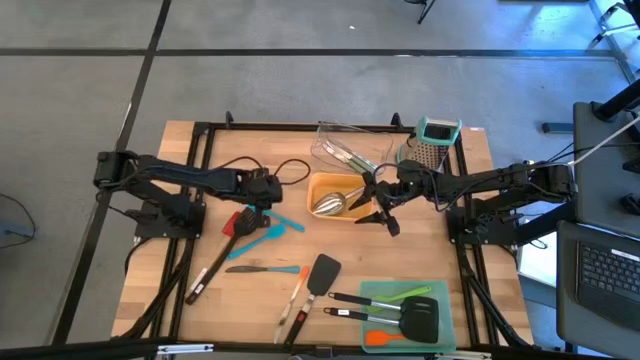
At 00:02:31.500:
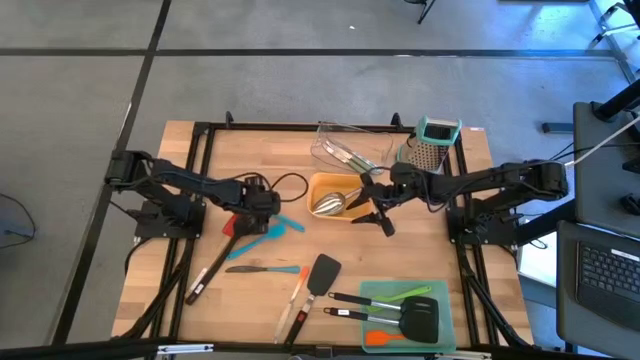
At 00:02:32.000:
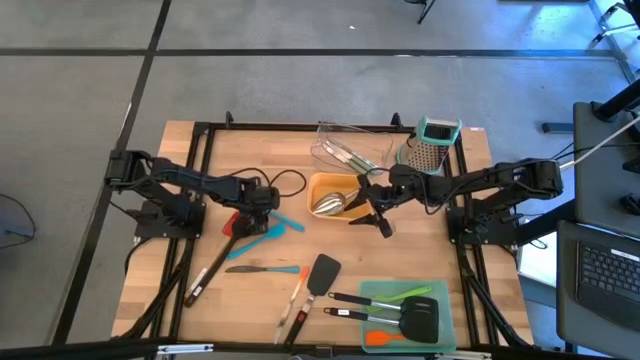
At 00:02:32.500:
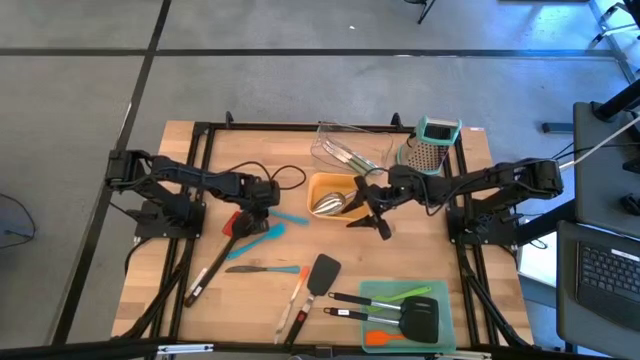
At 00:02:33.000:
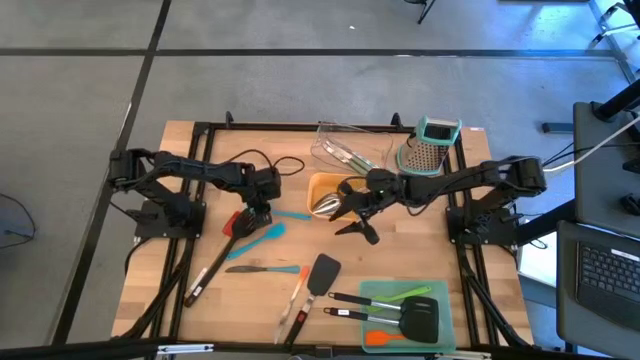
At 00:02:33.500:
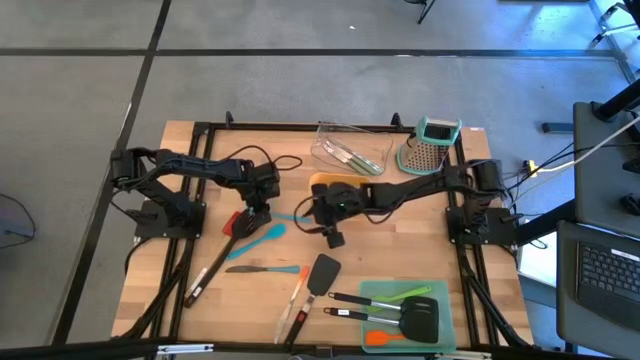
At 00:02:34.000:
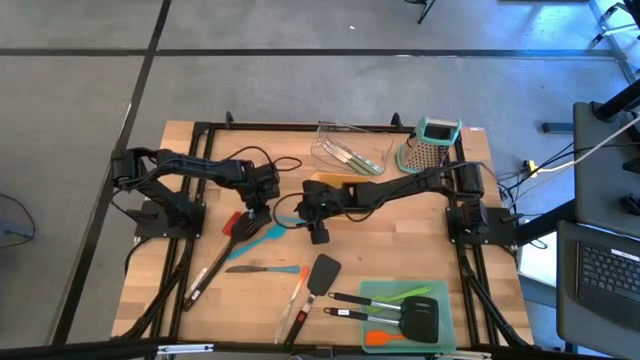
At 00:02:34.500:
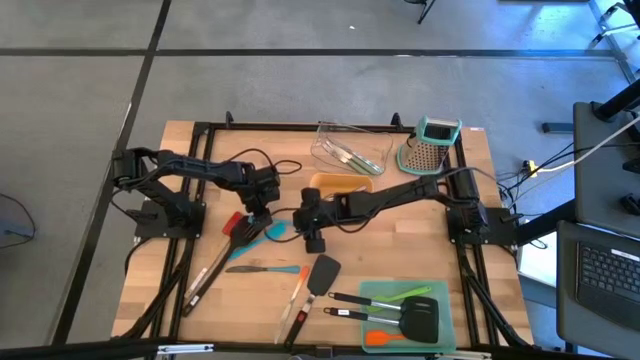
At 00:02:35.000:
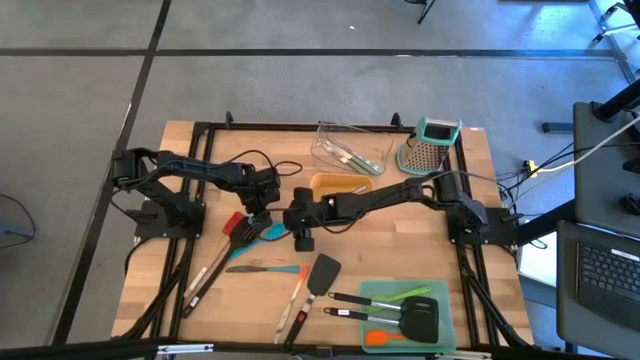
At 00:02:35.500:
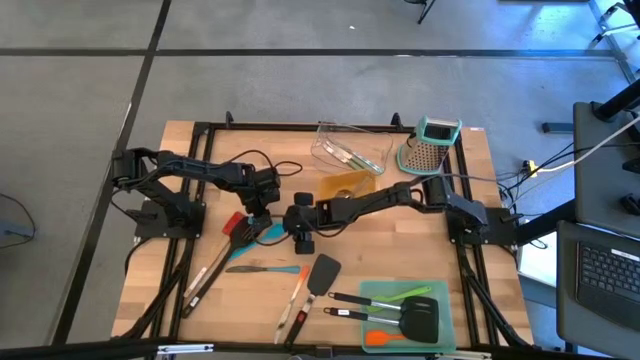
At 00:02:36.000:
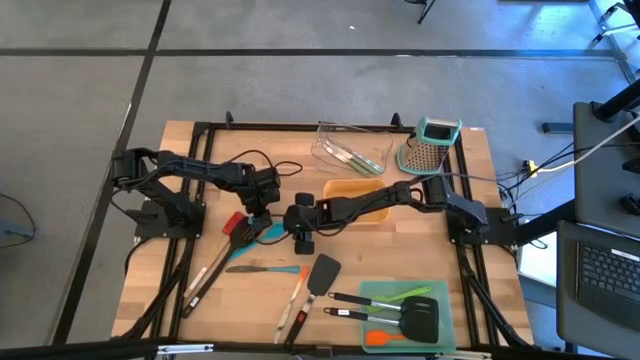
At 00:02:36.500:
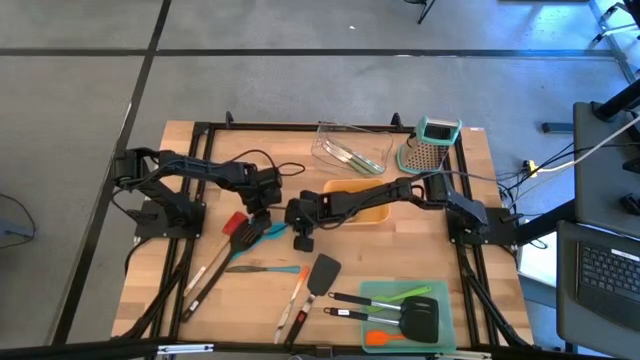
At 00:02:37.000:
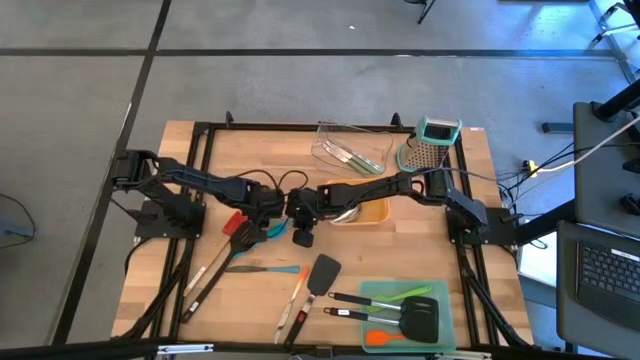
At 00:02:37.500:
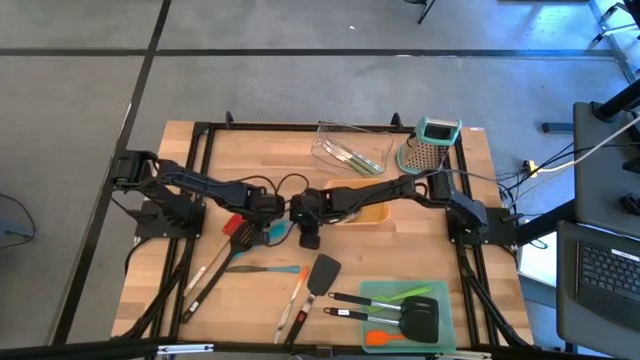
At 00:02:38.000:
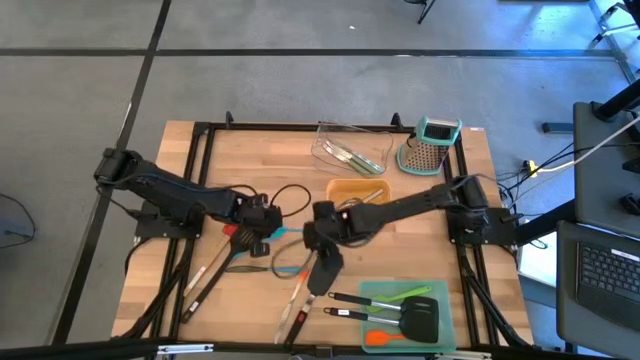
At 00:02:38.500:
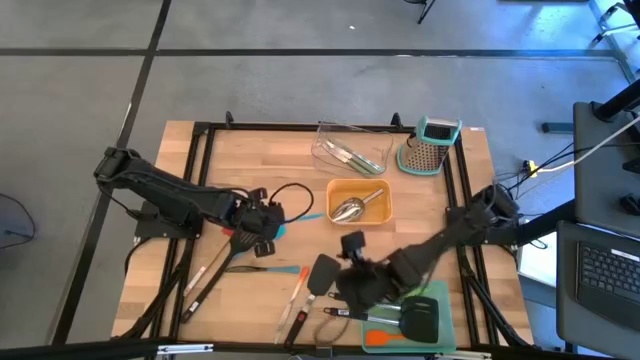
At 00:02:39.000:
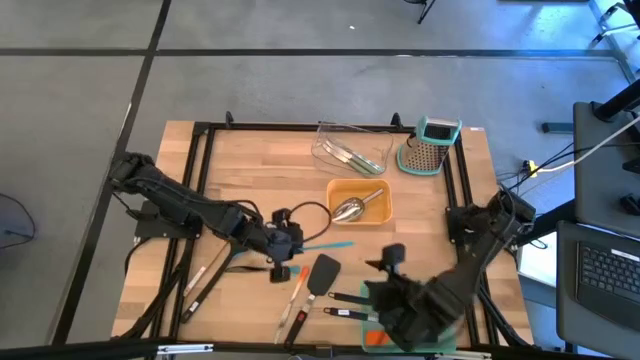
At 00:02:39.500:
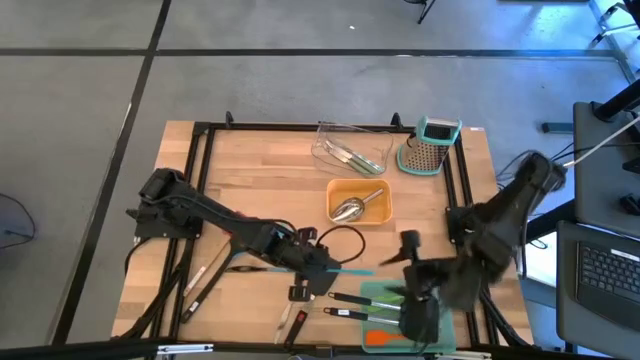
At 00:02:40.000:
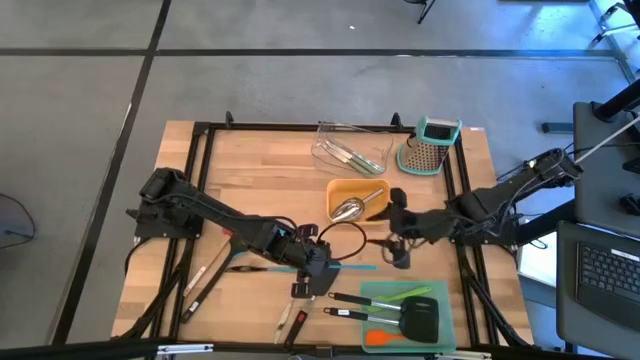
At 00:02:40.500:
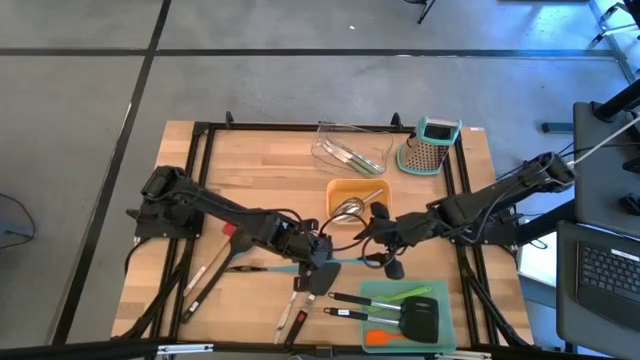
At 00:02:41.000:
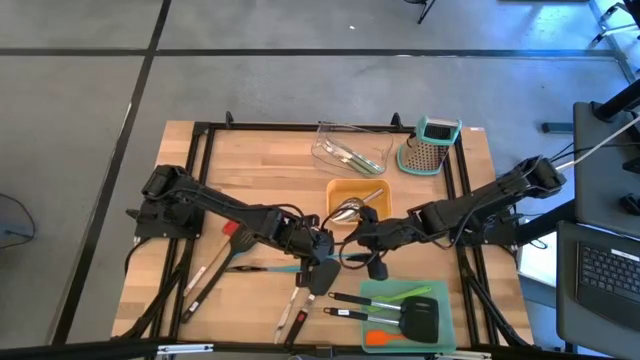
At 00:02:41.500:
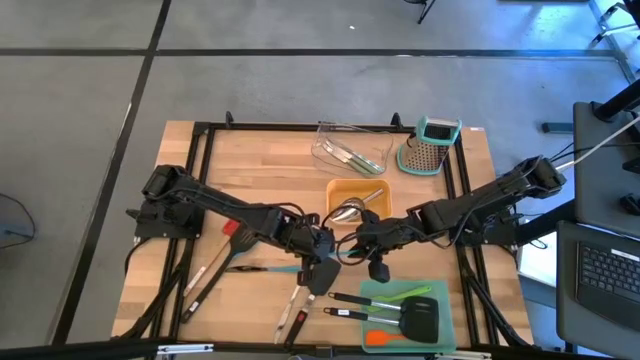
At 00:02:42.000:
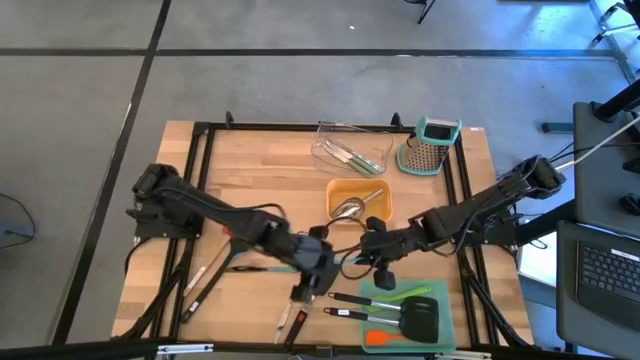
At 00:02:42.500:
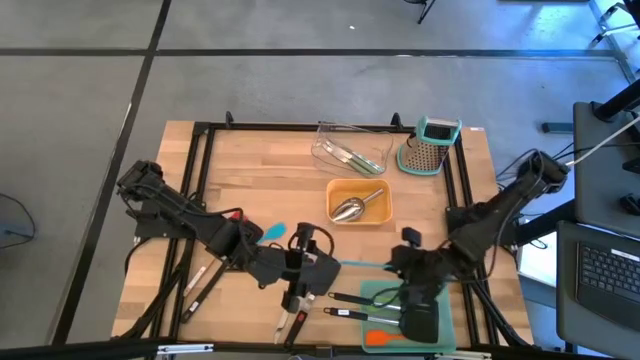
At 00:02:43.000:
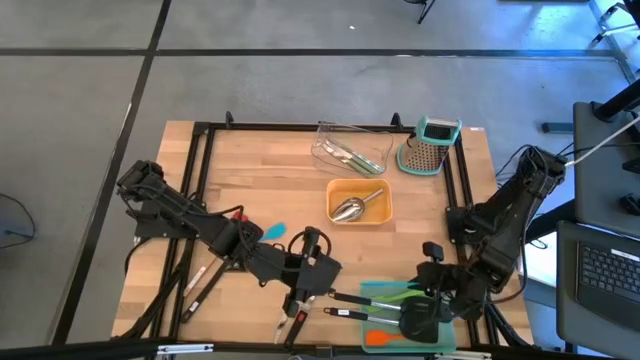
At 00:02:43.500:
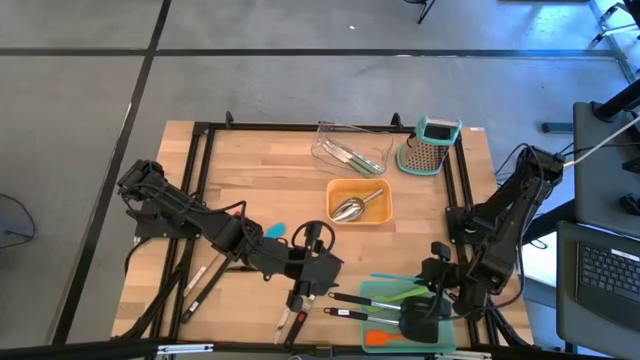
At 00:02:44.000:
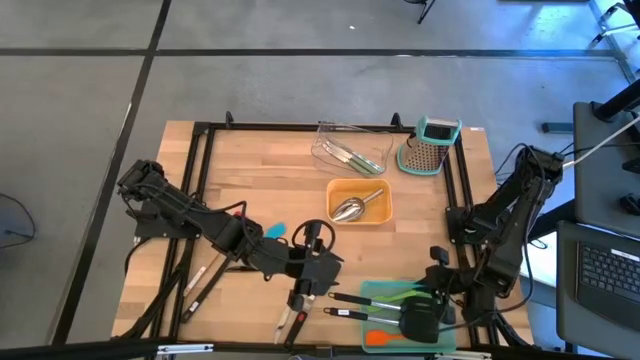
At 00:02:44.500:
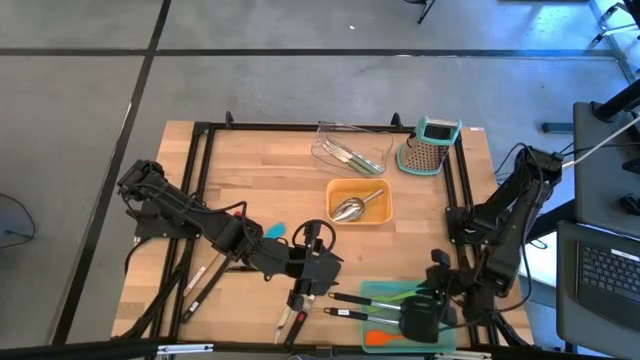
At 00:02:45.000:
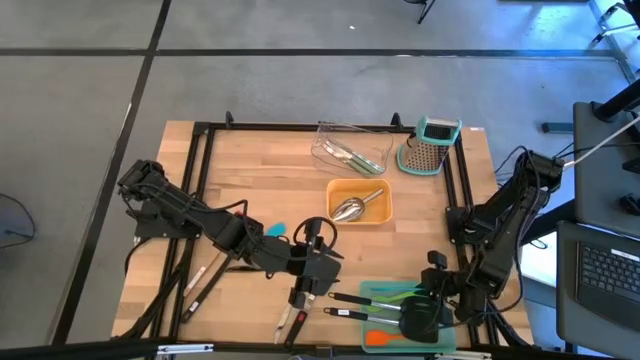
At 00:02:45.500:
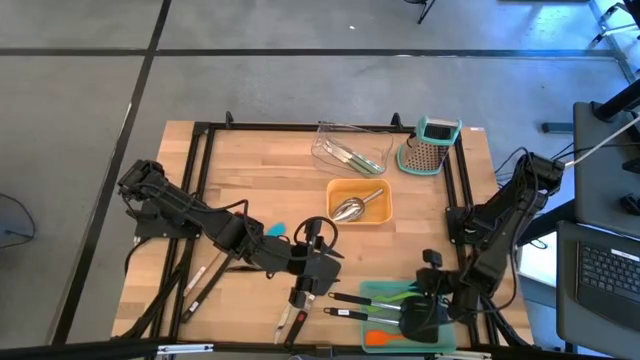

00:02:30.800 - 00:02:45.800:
Task: Pick & Place Kitchen Items
Put the top blue silicone spatula into the green bin
